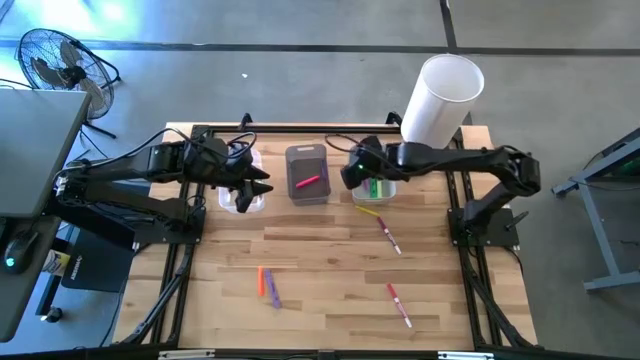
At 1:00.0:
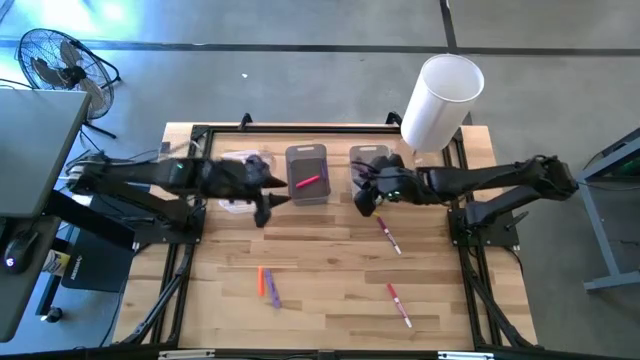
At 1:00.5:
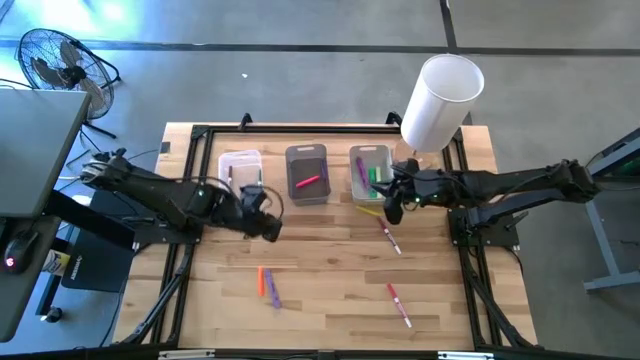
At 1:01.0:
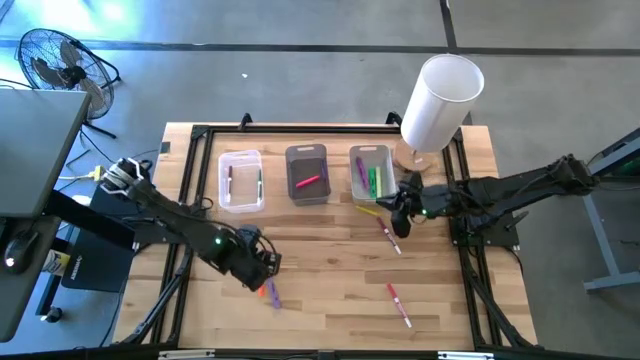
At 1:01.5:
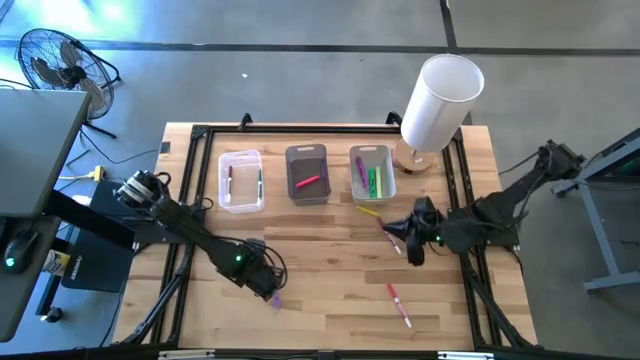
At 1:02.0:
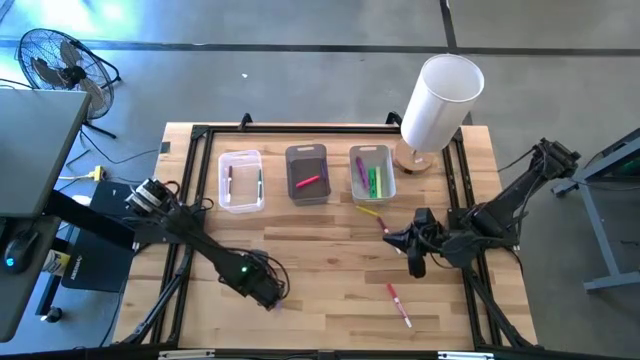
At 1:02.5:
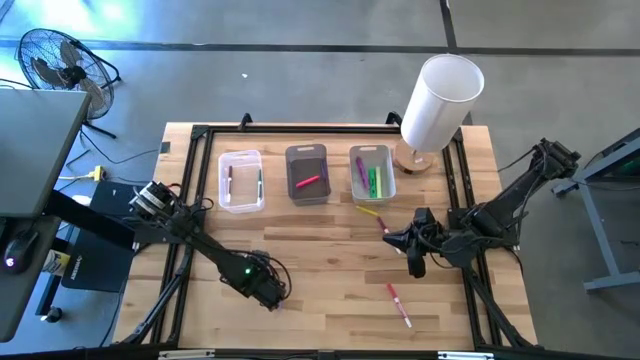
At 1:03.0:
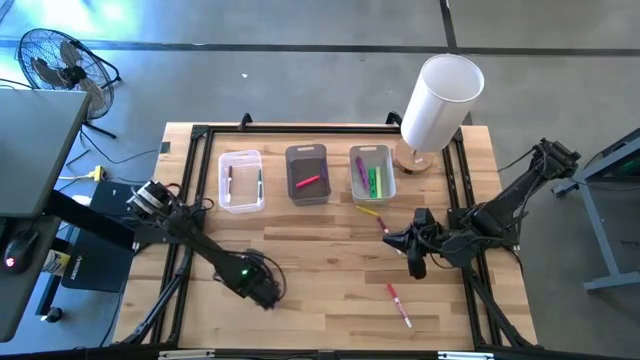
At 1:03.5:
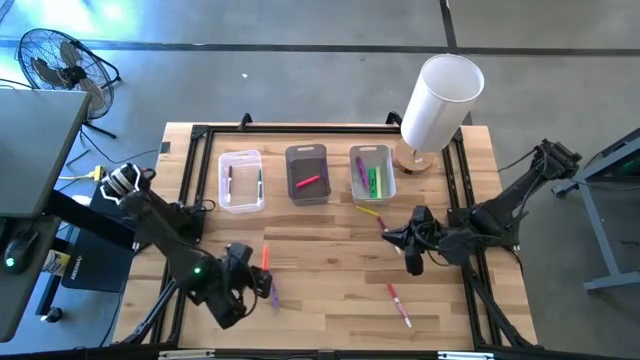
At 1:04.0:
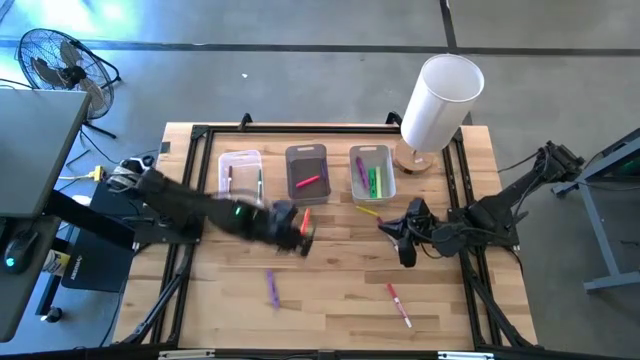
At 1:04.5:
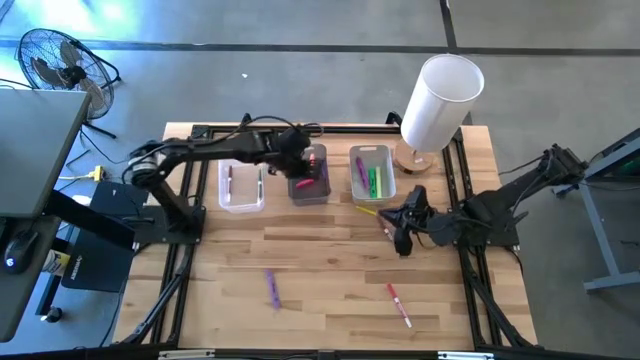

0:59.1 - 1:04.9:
Task: Pick & Place Markers
Put the orange pen into the black bin

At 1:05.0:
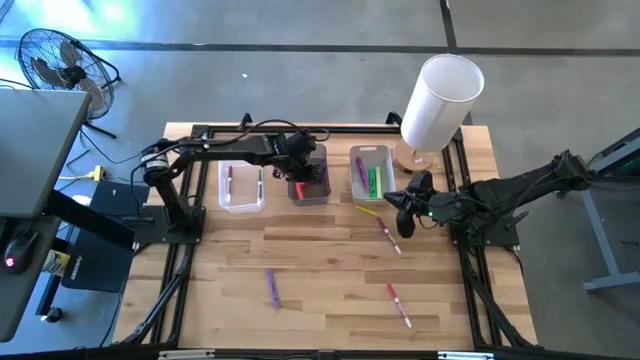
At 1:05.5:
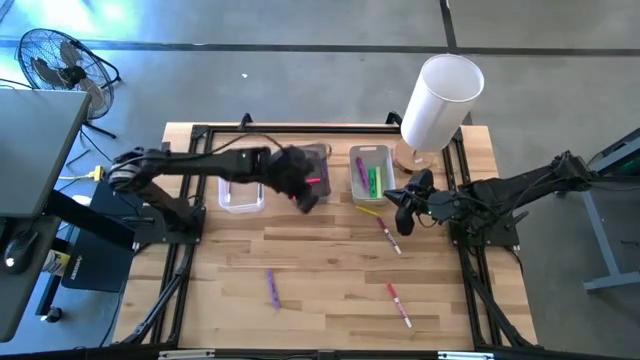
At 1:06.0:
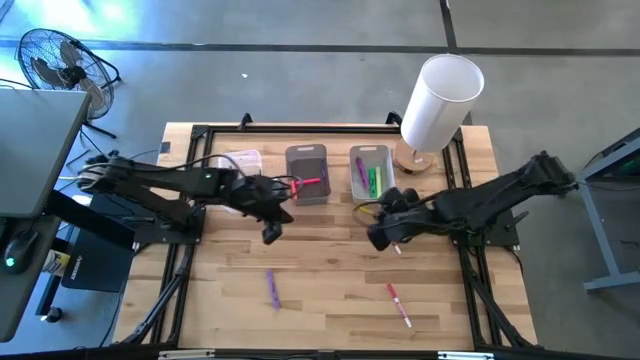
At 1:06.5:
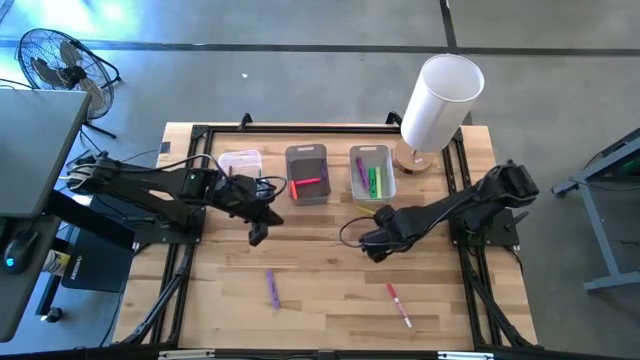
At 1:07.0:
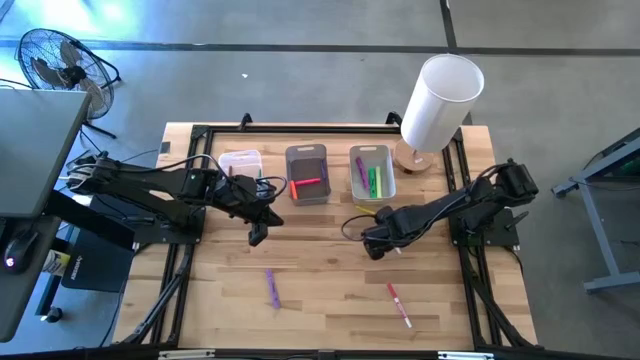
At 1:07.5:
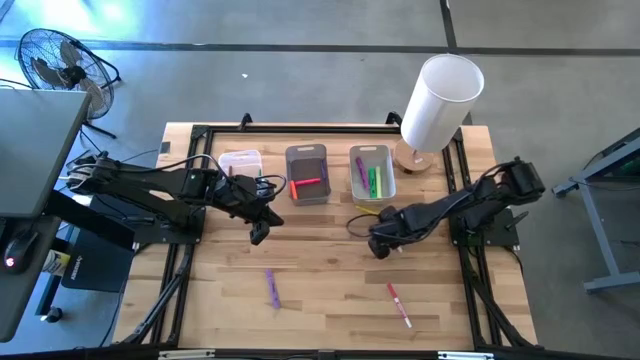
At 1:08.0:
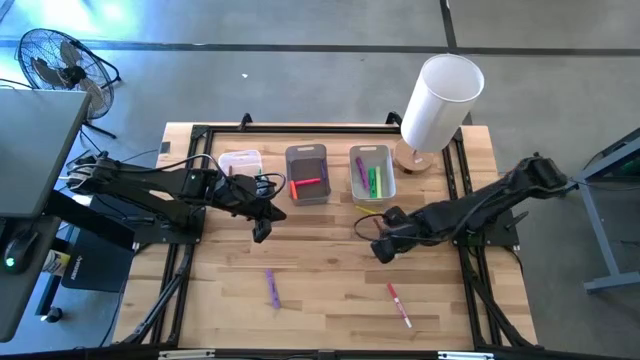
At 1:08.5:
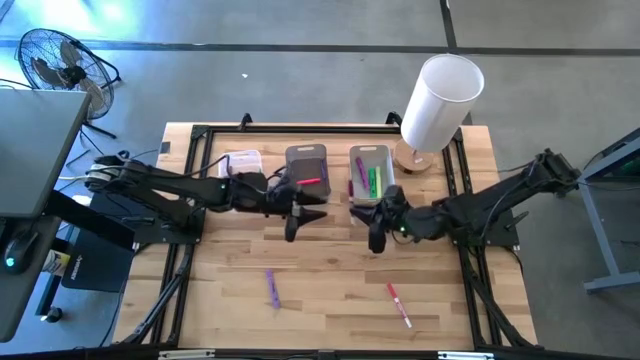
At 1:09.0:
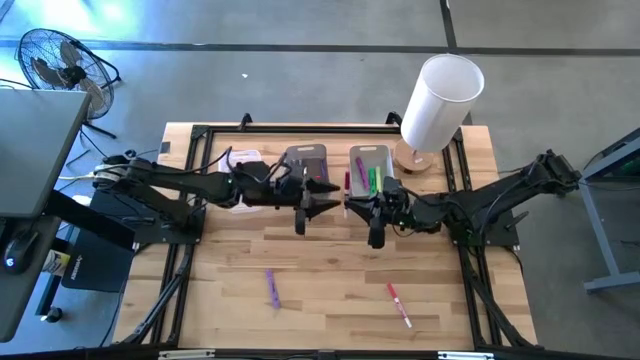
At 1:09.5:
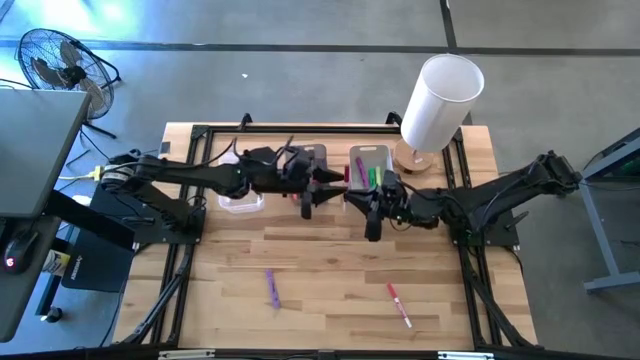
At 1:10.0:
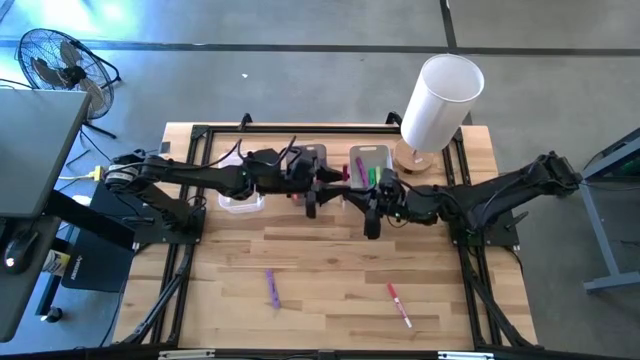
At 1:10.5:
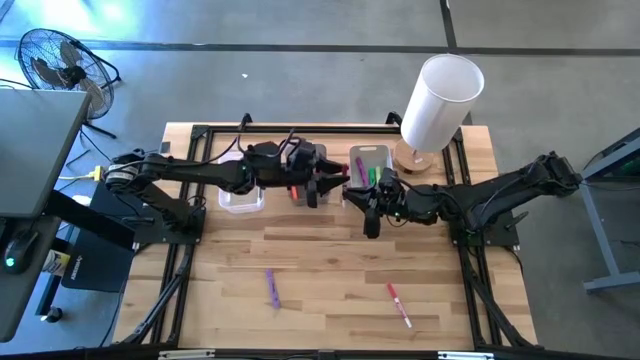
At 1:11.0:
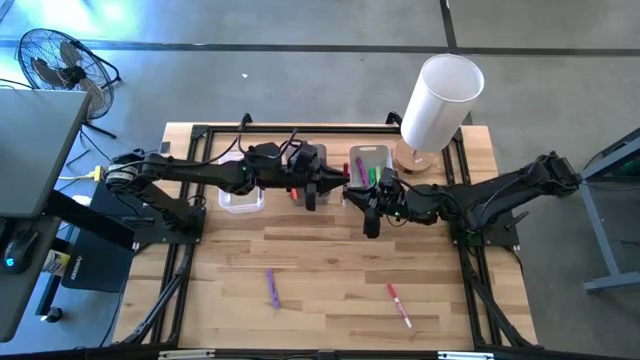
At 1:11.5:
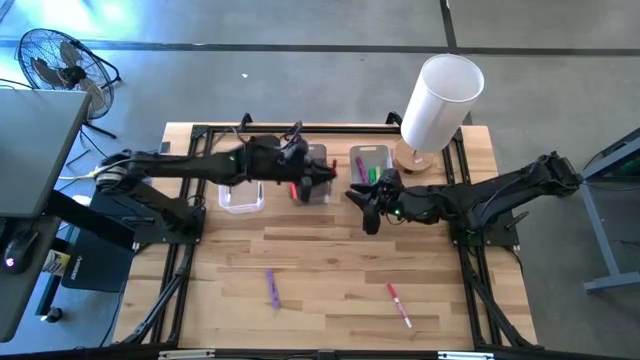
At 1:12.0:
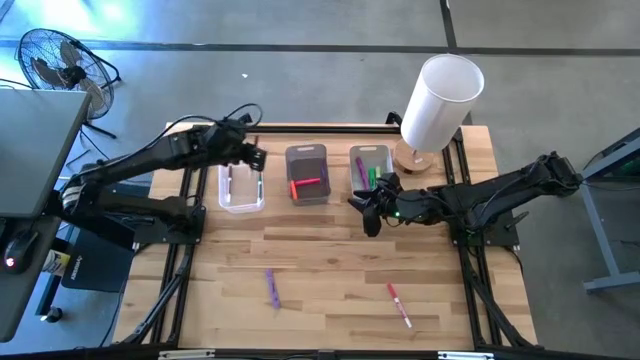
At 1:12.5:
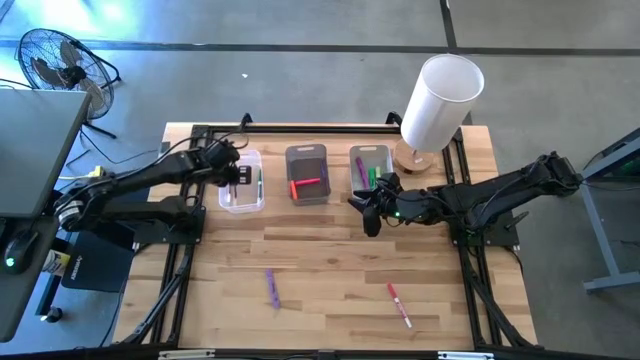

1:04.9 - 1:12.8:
Put the purple marker pen into the transparent bin

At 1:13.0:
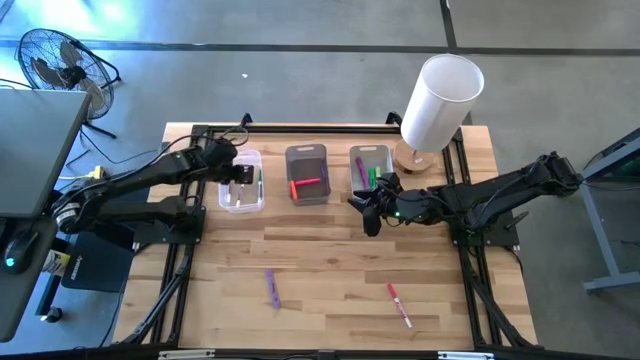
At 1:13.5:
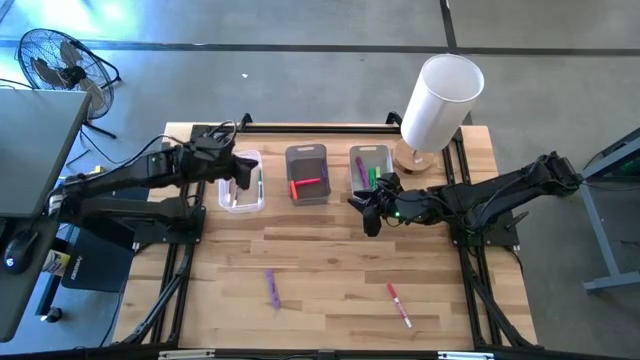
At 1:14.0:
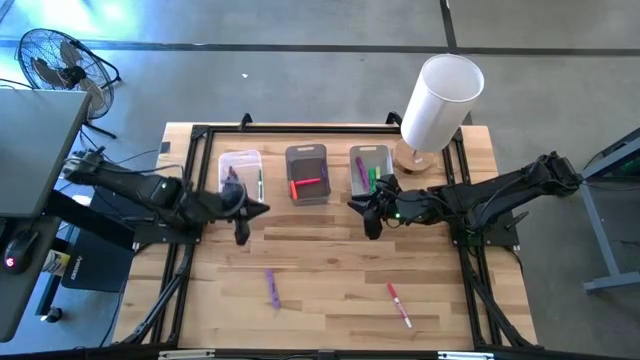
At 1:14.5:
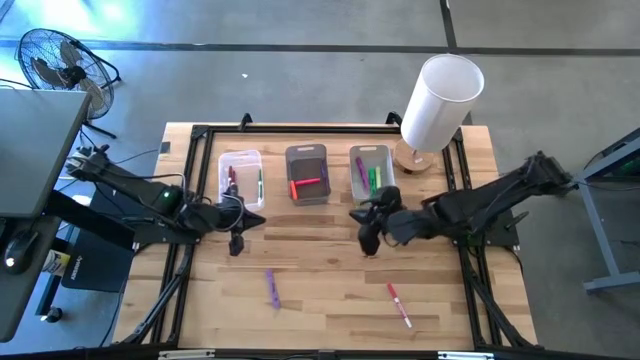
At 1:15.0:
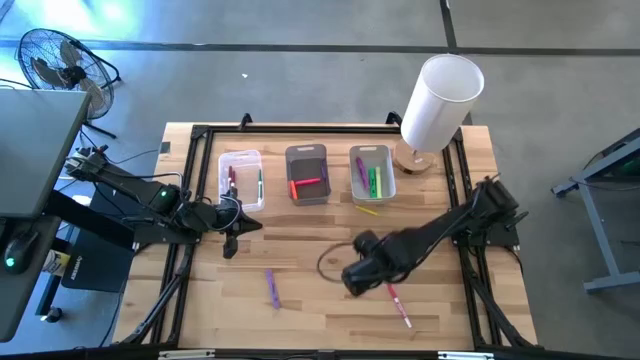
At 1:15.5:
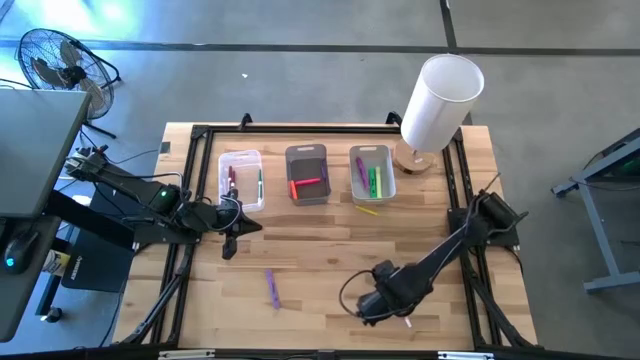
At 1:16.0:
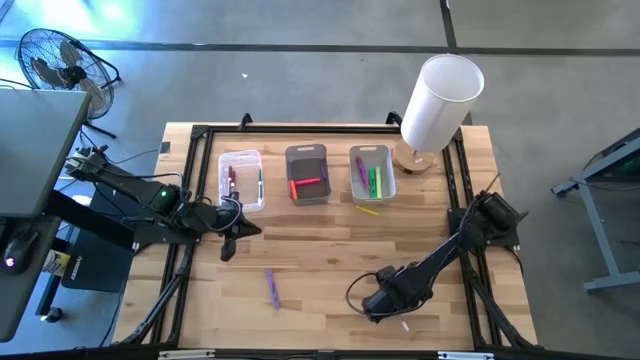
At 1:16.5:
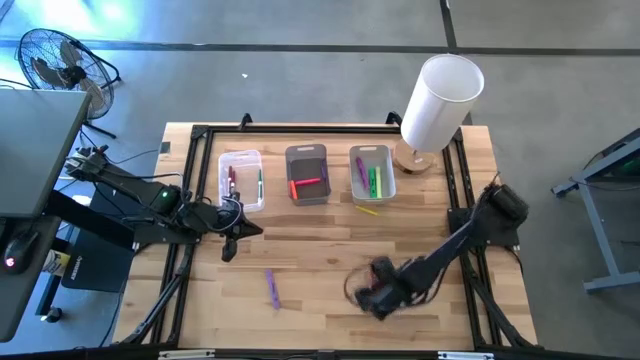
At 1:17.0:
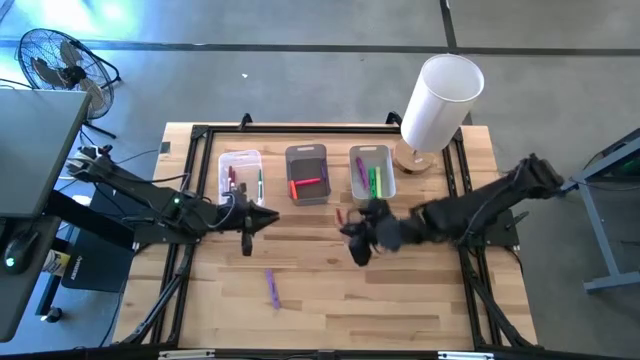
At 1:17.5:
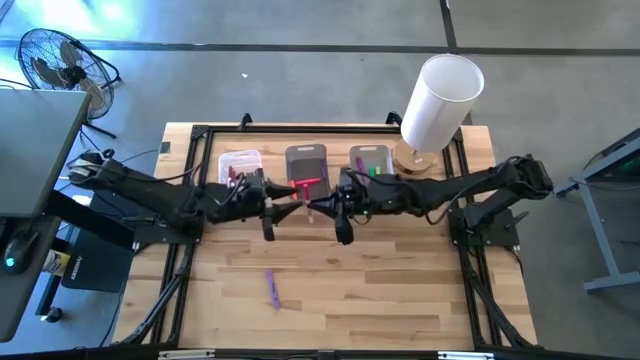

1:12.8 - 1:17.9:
Put the light pink marker pen into the transparent bin

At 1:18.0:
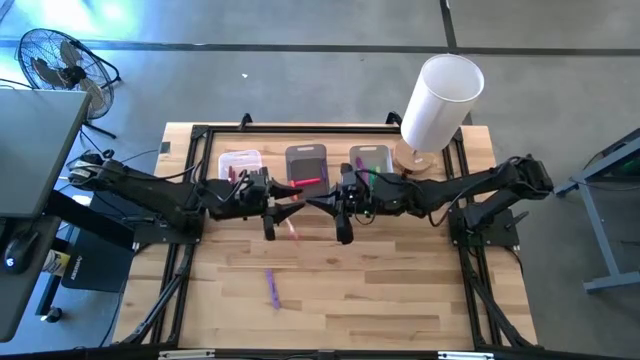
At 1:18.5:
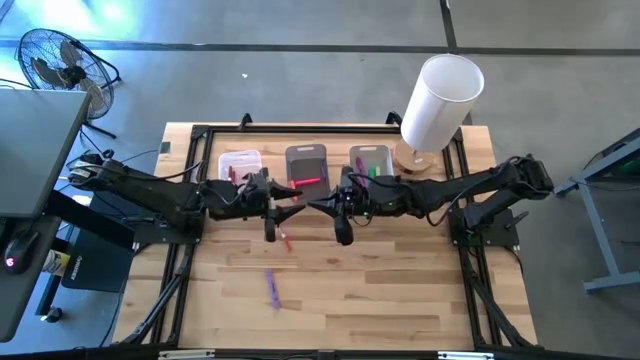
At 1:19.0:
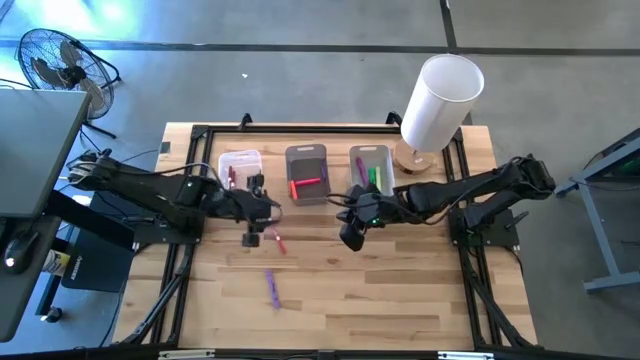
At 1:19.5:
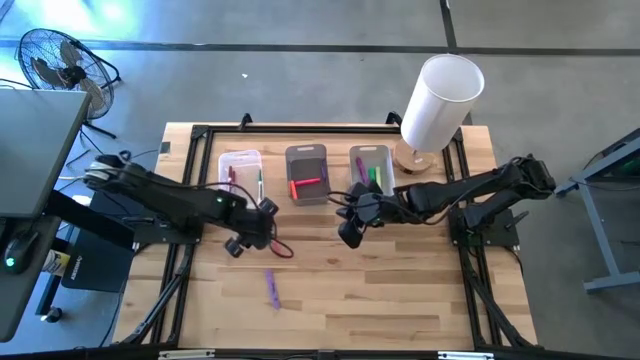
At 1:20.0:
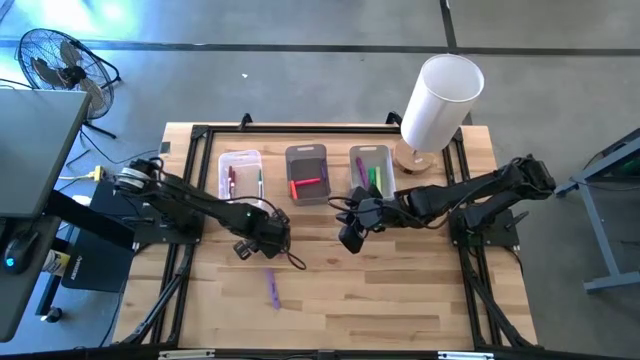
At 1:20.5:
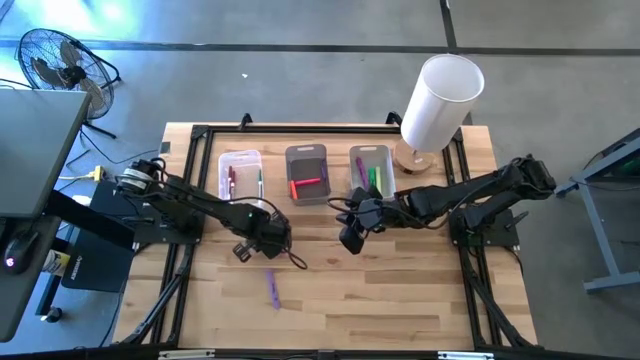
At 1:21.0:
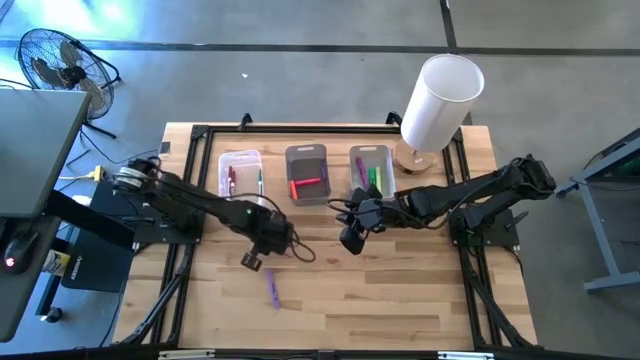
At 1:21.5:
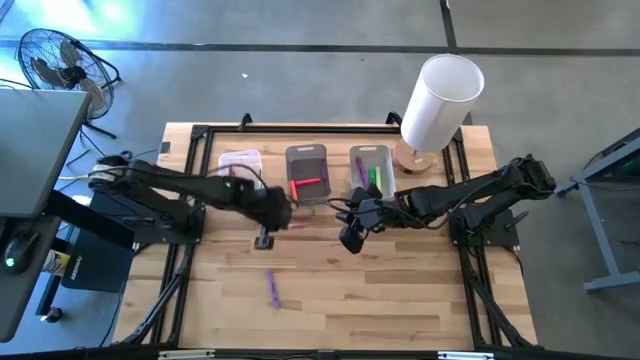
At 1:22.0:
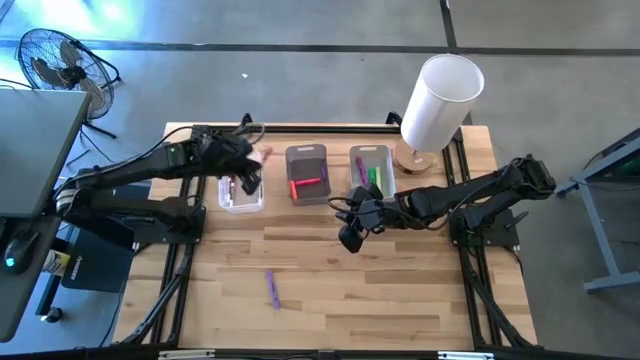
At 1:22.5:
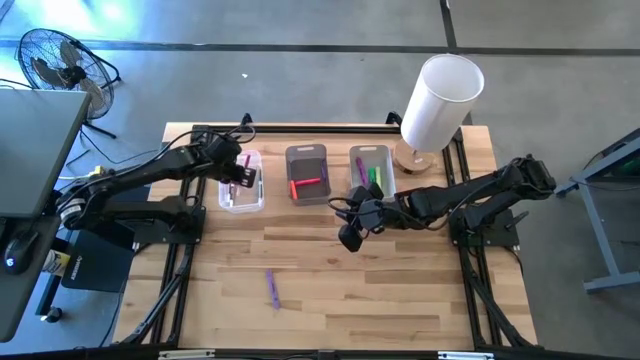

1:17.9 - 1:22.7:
Put the light pink marker pen into the transparent bin
